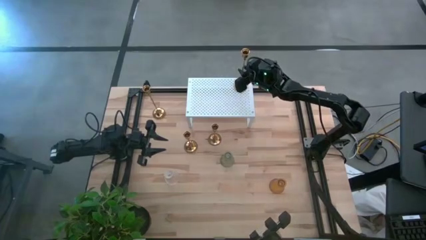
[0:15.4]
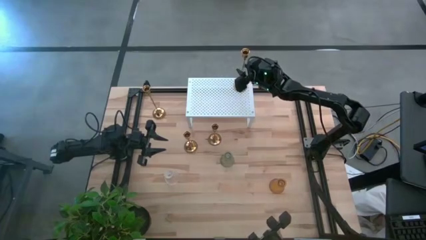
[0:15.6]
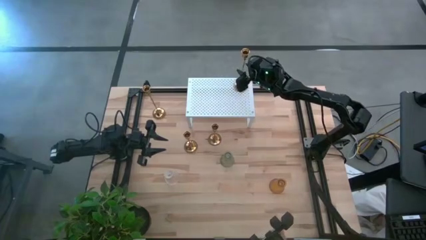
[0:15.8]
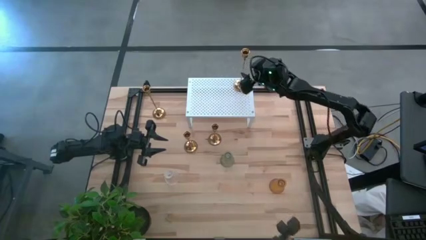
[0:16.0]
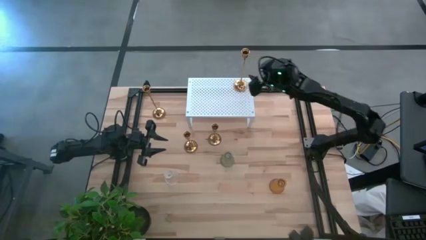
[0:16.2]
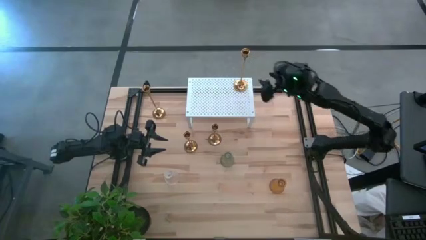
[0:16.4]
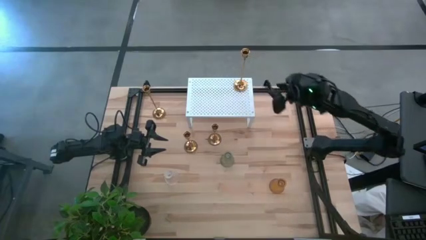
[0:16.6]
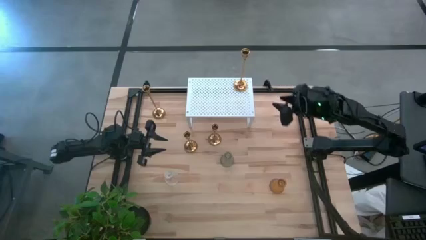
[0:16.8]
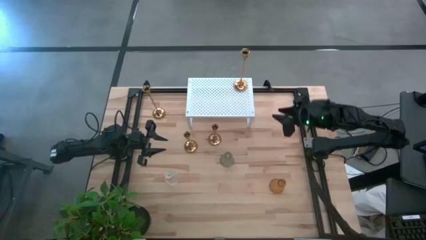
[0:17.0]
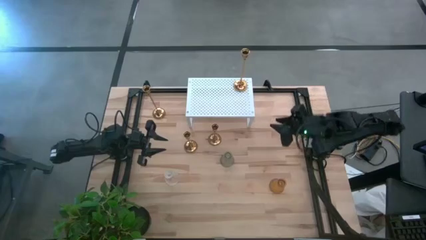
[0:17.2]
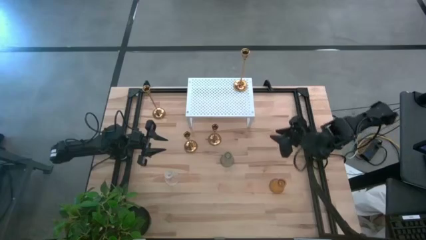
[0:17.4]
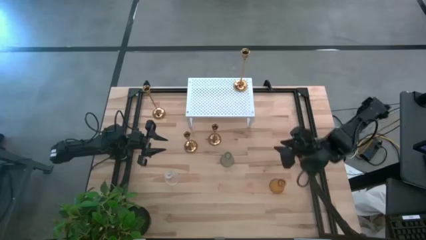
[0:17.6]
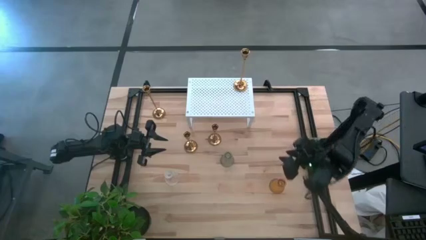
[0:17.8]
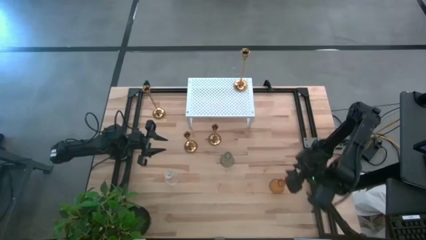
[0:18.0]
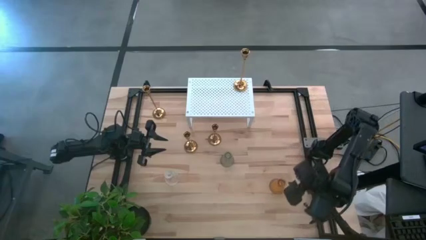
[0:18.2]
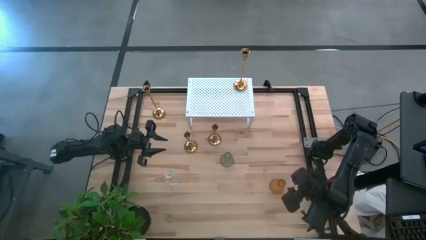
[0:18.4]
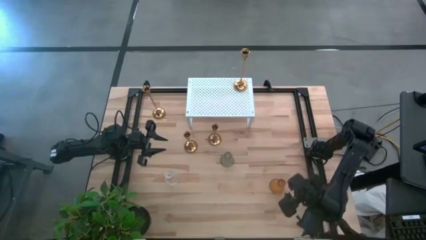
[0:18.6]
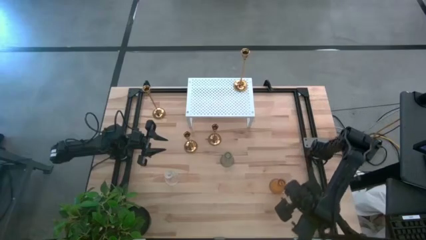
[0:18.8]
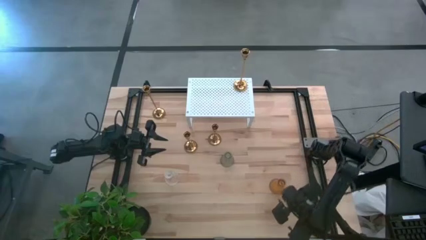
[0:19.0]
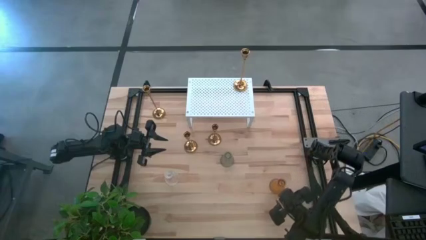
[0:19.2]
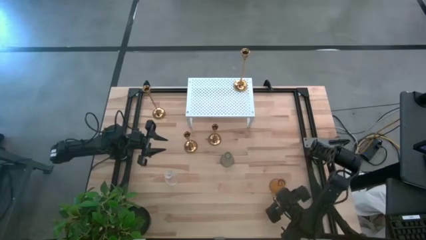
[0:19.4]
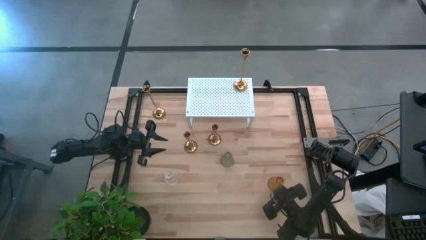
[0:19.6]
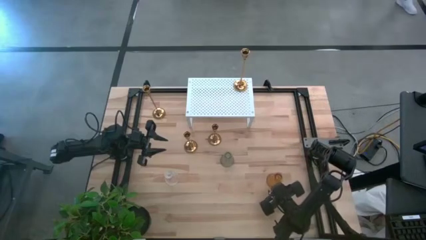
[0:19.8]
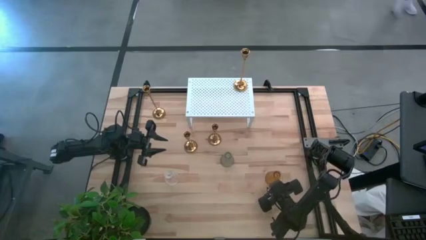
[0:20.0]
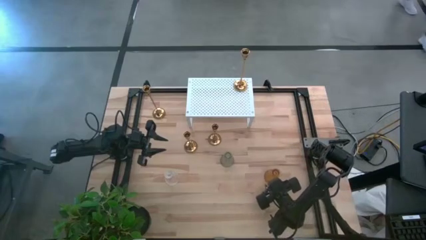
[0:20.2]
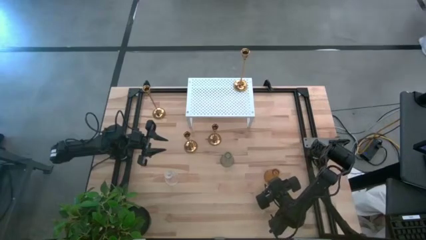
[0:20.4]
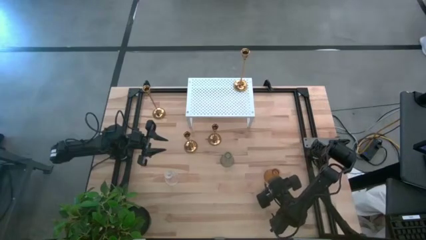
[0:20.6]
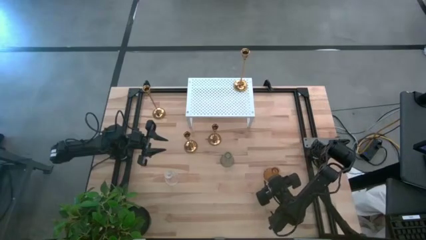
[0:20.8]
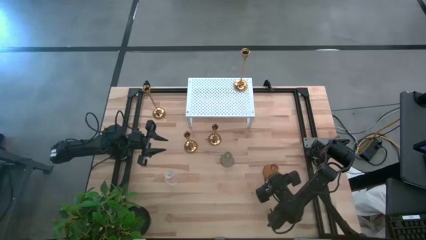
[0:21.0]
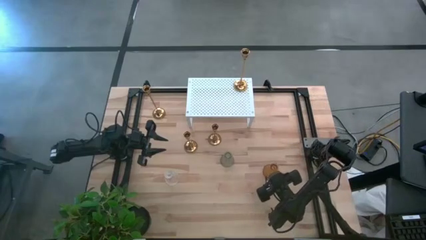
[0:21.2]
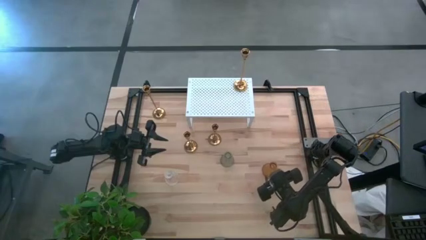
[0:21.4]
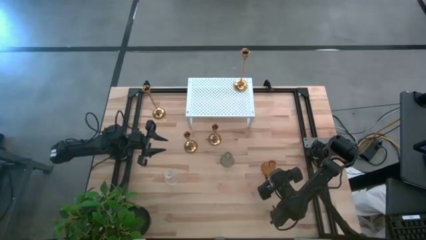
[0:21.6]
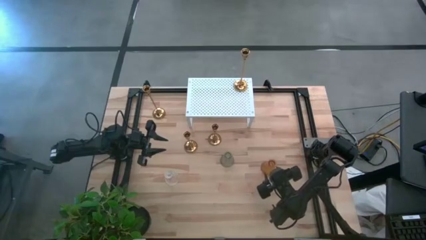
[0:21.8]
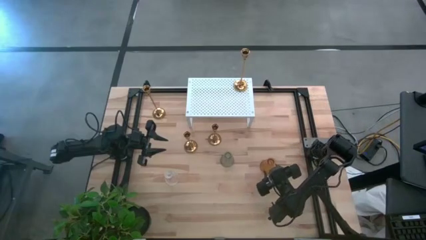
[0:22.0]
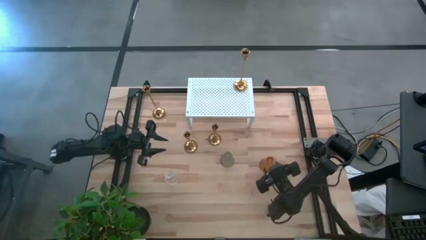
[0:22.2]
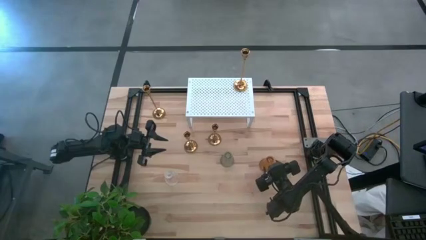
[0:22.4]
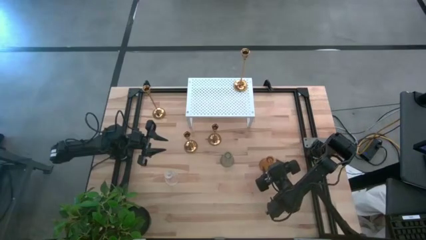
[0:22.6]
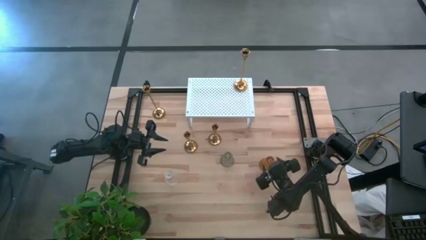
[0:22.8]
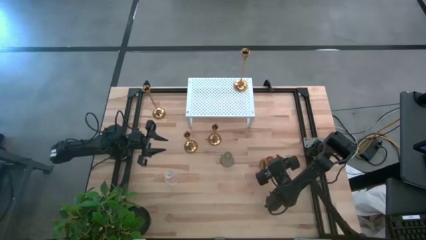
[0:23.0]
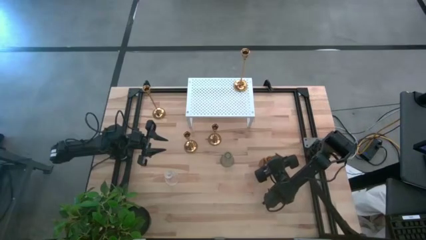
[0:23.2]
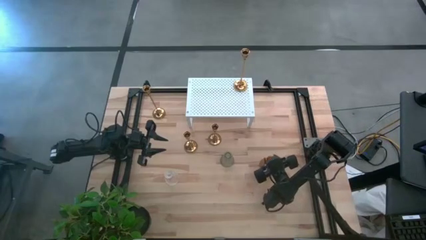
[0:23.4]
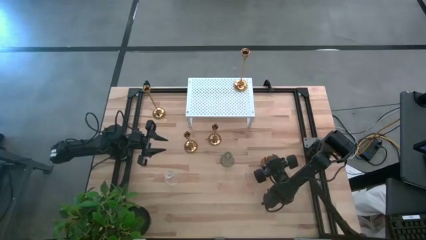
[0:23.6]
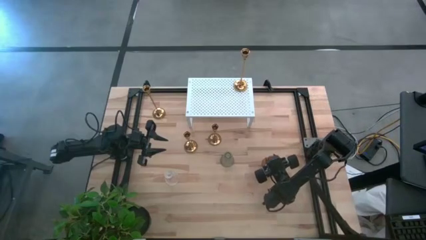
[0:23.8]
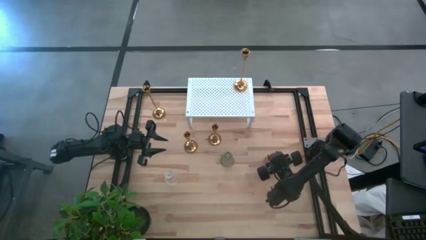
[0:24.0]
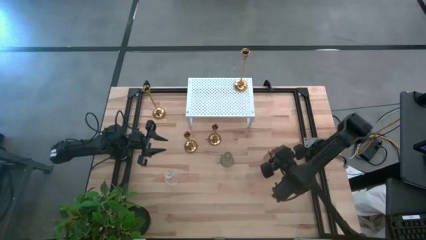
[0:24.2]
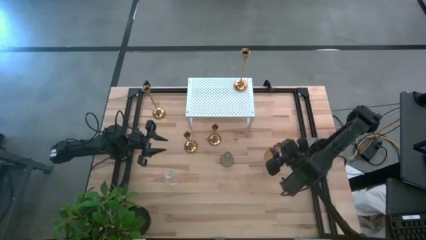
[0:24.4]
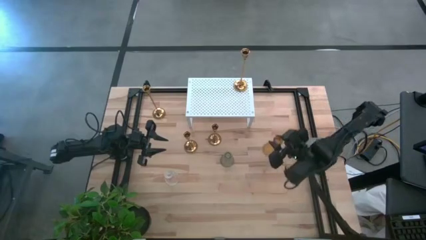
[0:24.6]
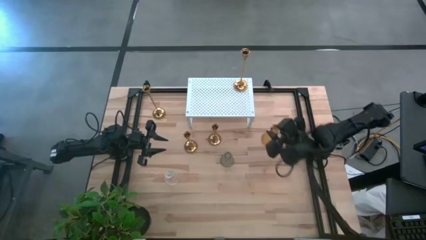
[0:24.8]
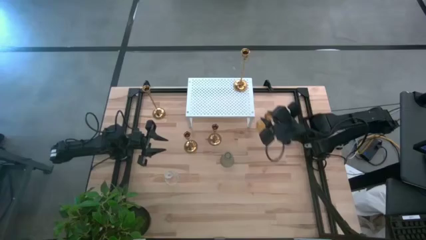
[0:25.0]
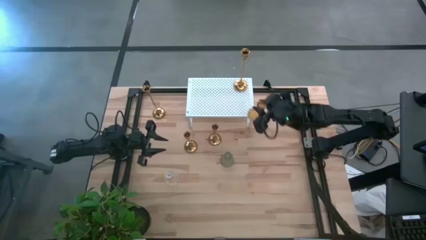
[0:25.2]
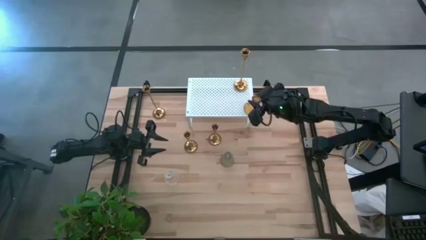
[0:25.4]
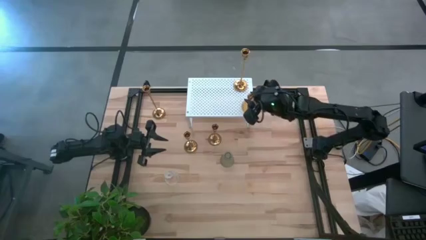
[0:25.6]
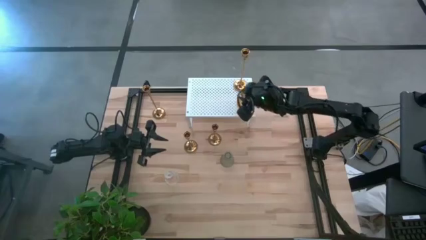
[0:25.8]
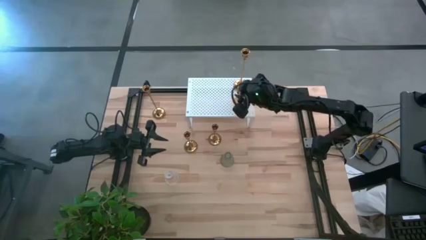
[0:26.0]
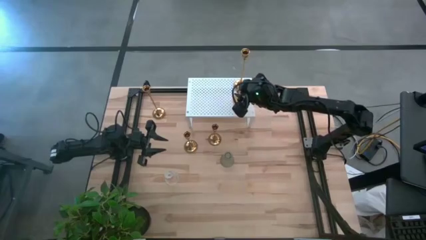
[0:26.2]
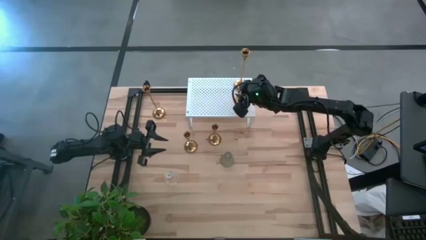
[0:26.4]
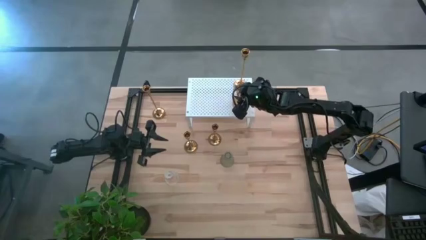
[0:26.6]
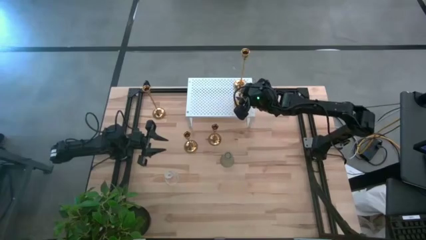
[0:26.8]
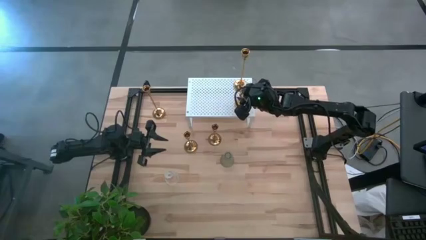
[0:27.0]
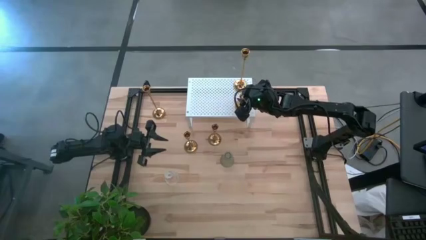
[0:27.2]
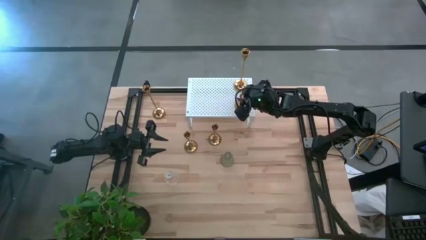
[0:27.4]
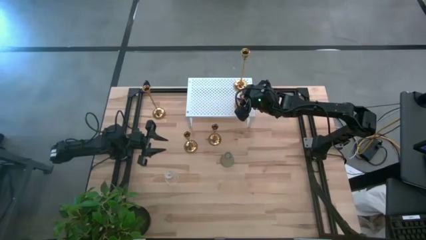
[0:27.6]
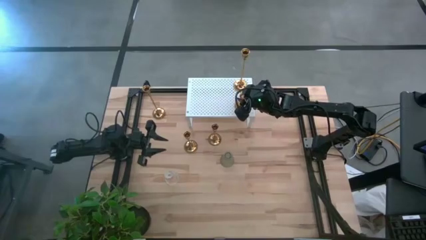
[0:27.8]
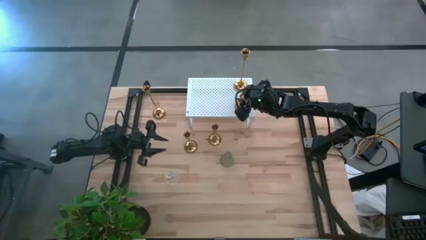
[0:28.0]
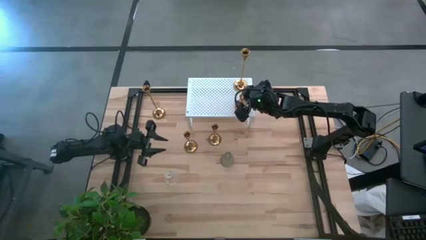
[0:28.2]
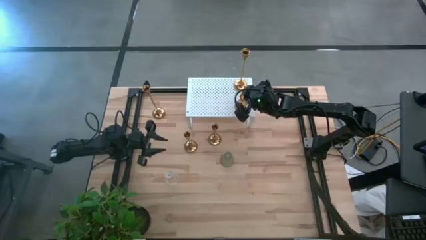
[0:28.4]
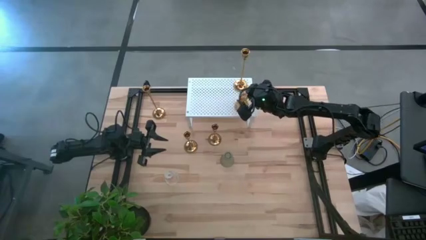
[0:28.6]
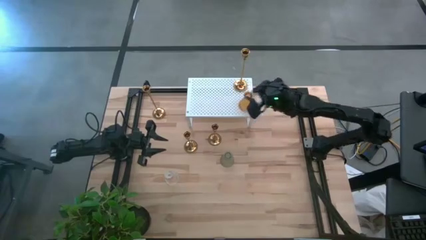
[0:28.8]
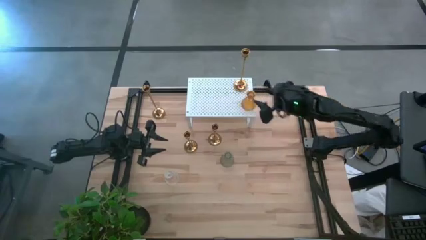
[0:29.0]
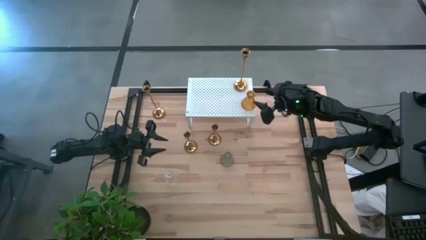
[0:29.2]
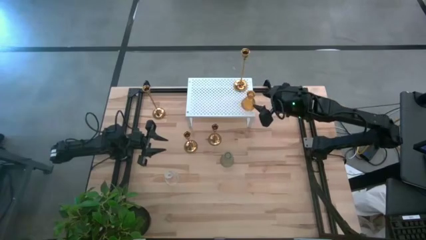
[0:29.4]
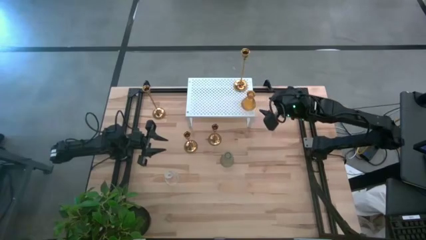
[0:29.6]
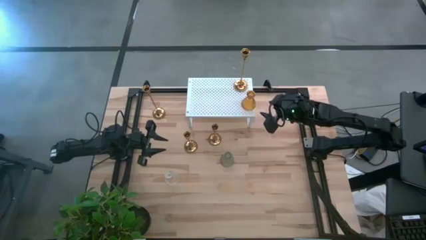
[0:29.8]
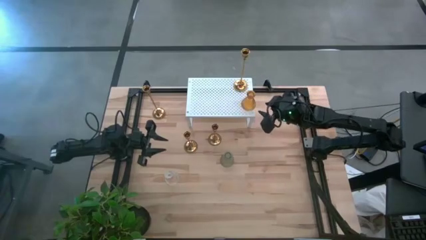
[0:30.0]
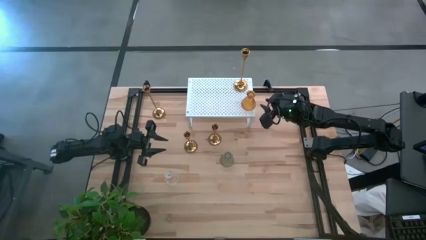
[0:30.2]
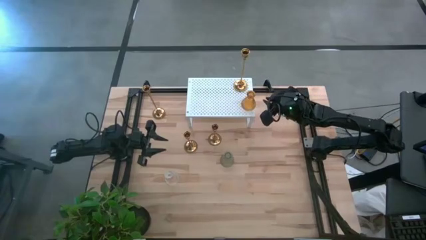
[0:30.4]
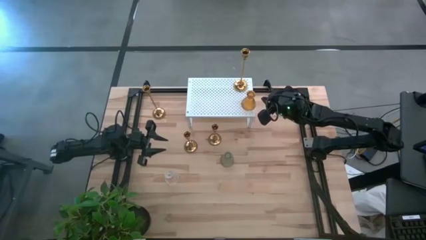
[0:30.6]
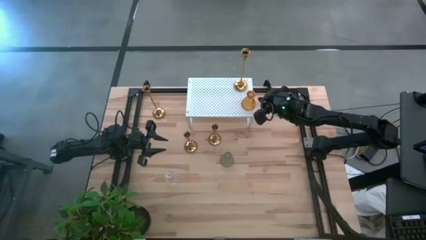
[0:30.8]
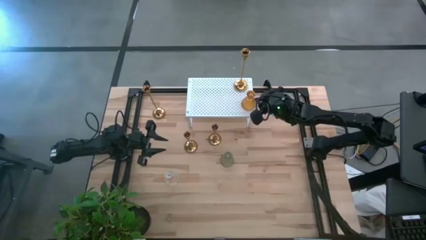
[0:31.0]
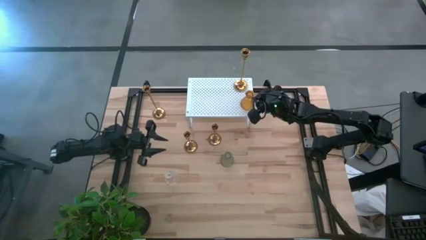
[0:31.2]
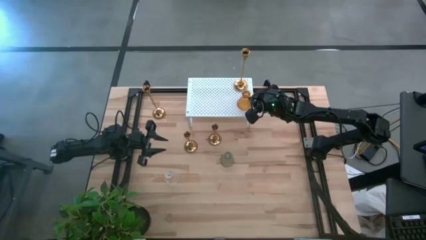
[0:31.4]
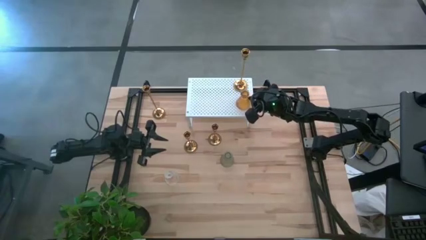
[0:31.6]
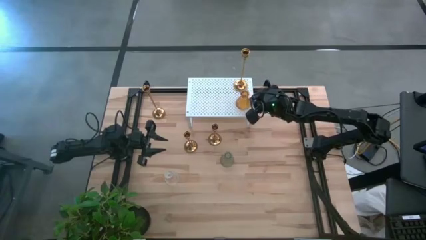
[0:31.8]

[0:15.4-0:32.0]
Task: Pick & Place candle stick holders
Put the brown glass candle holder on the shelf
